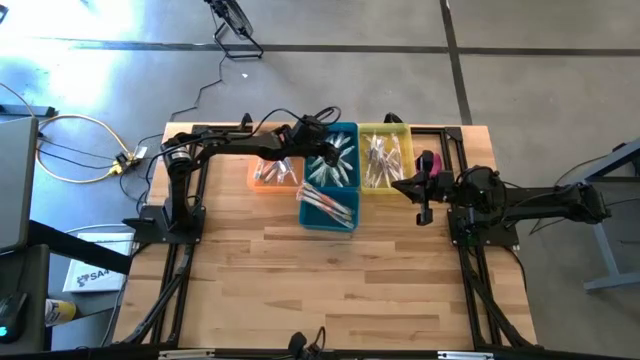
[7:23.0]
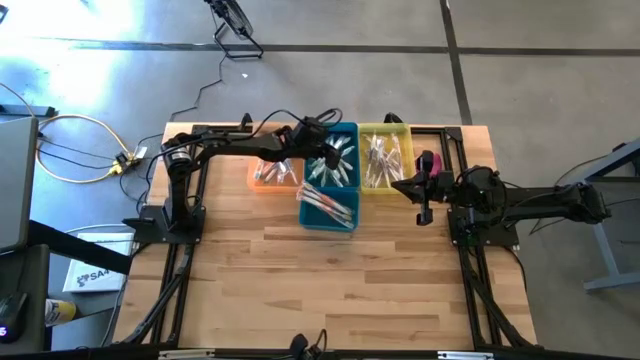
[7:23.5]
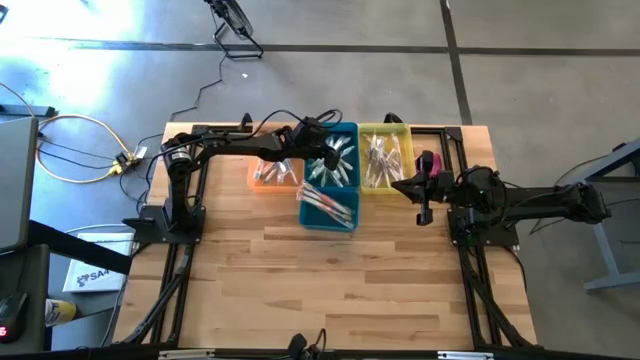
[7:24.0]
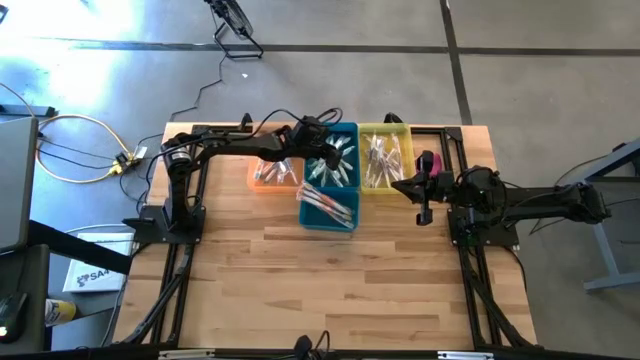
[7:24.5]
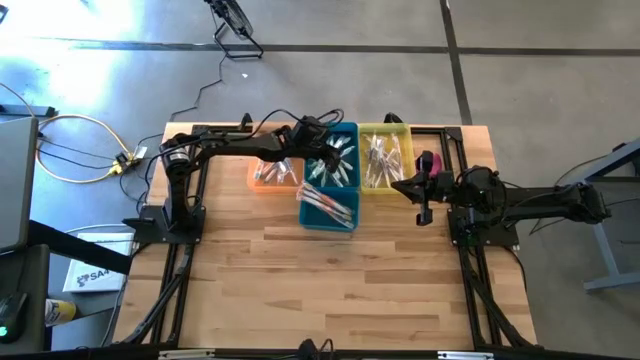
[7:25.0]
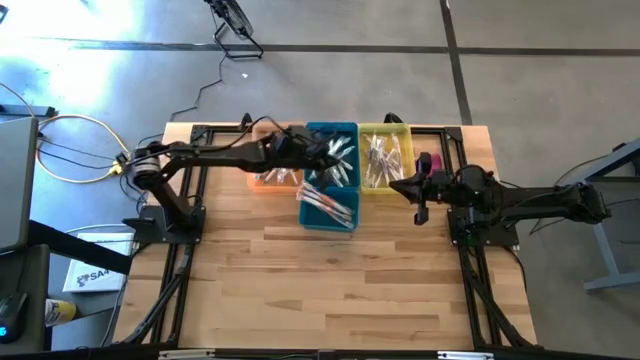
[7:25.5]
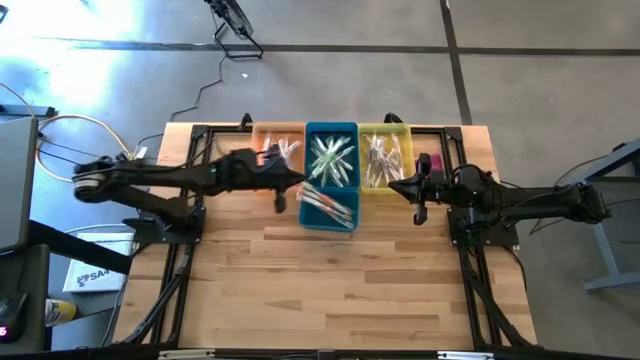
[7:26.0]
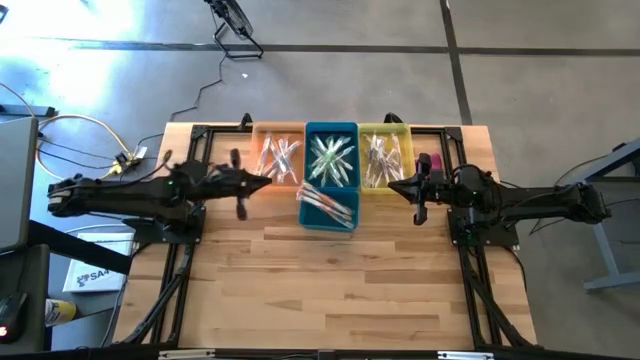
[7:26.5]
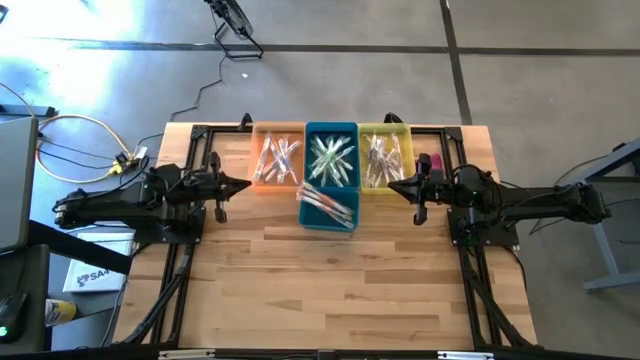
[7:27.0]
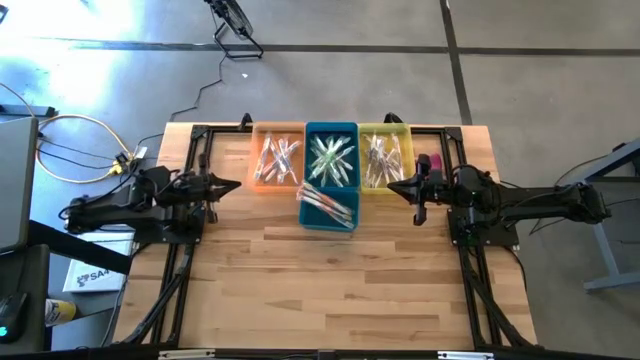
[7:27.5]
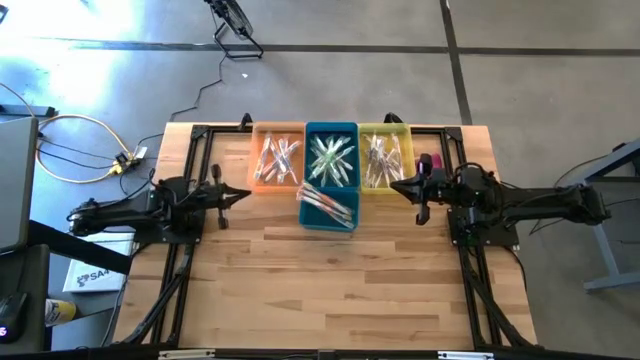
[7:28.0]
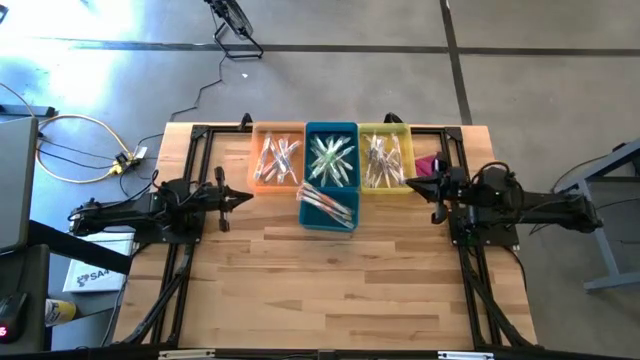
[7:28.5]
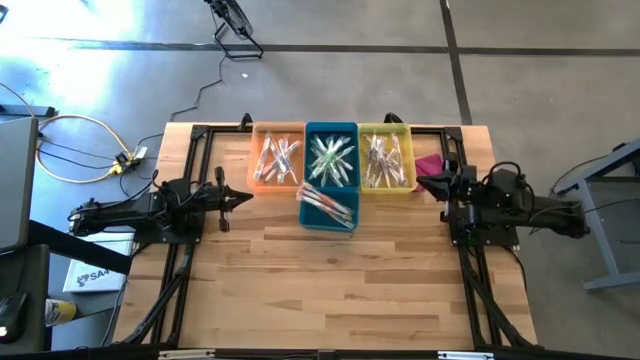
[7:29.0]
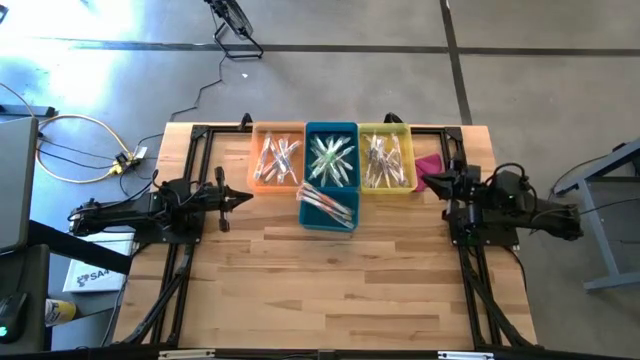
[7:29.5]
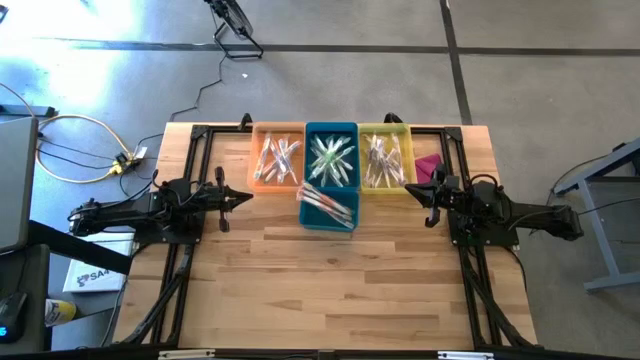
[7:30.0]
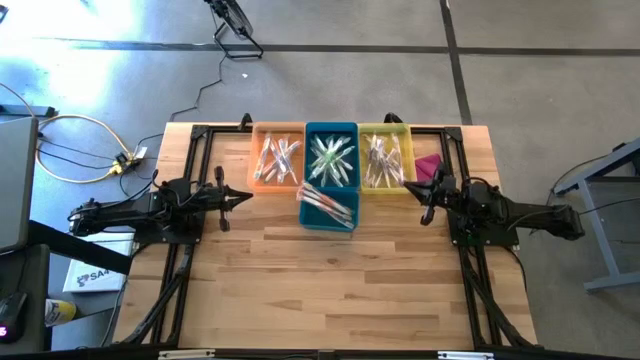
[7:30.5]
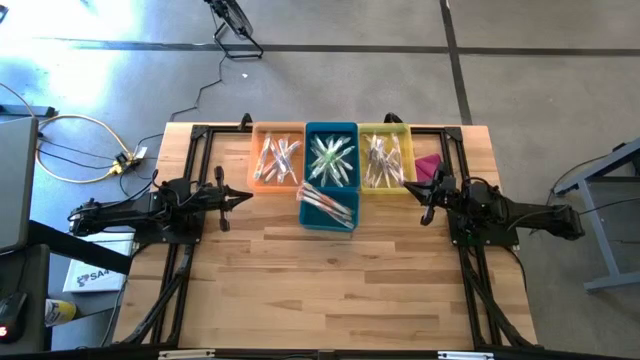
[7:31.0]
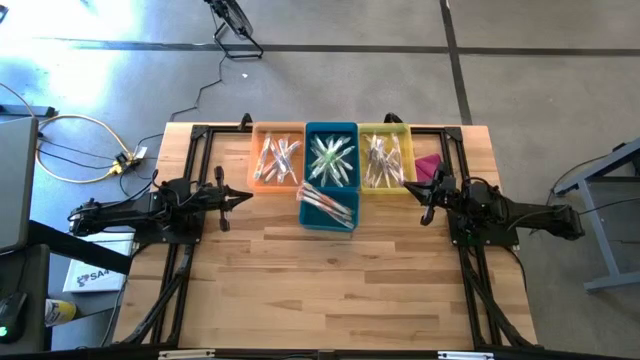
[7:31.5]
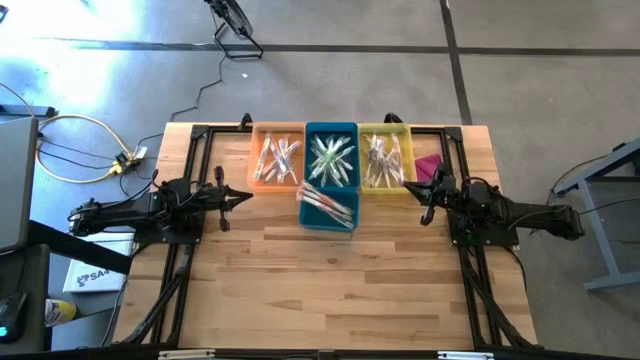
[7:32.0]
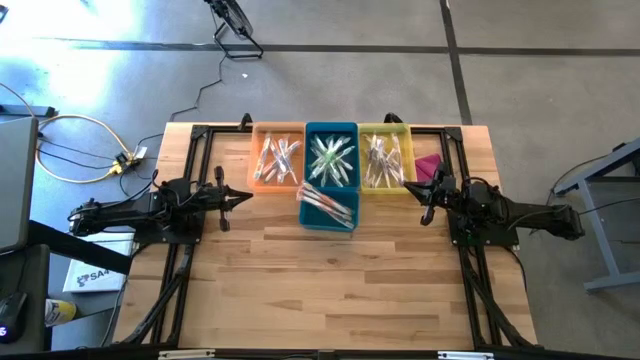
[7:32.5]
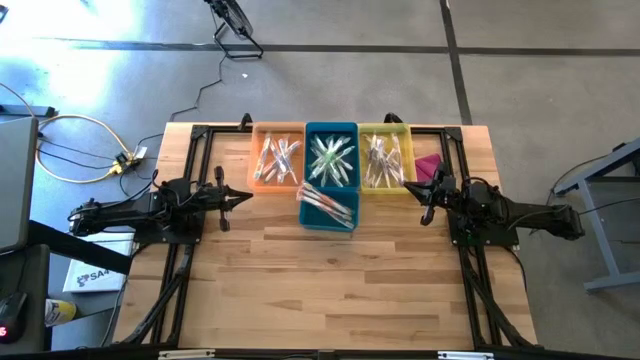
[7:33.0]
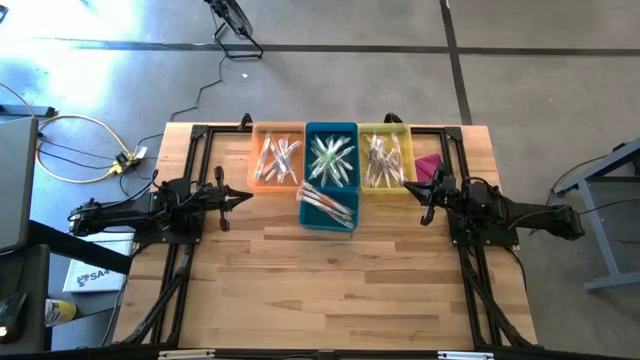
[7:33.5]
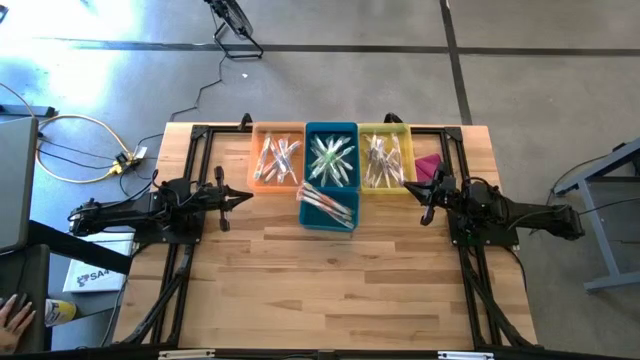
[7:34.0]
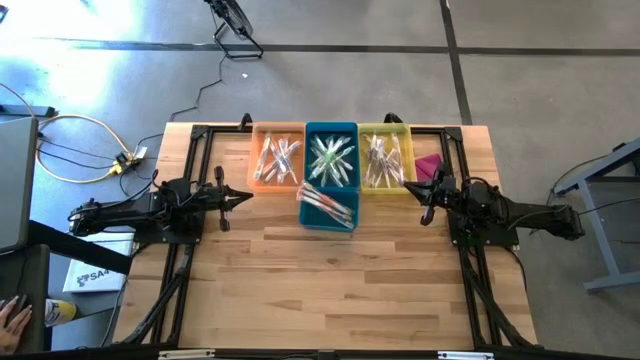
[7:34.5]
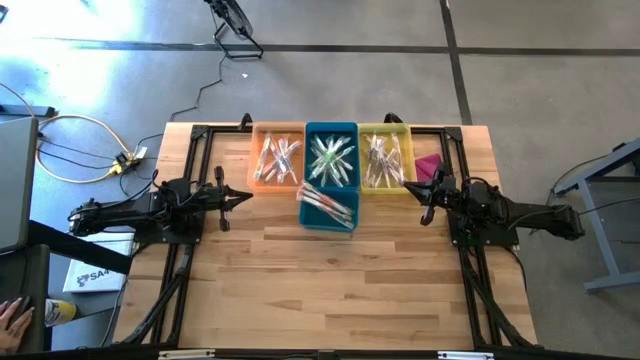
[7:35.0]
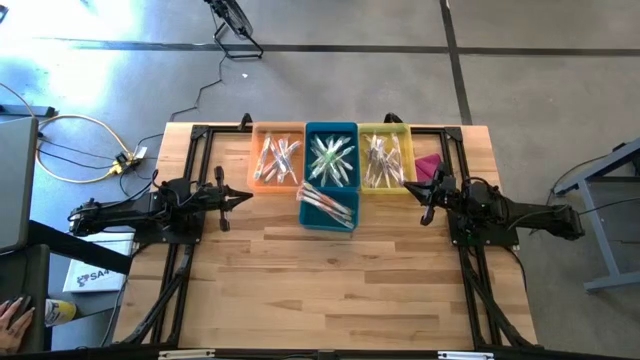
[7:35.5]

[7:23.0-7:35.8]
Task: Pick & Place Toothbrushes
Return to Home Position

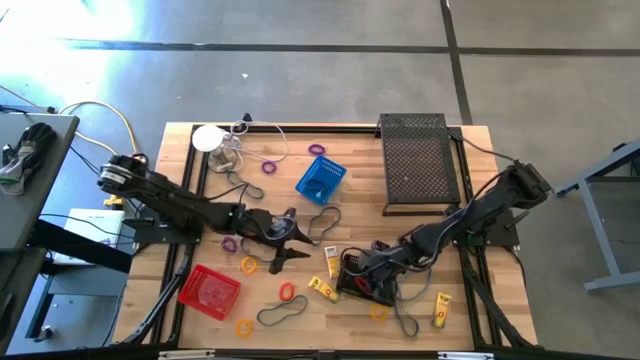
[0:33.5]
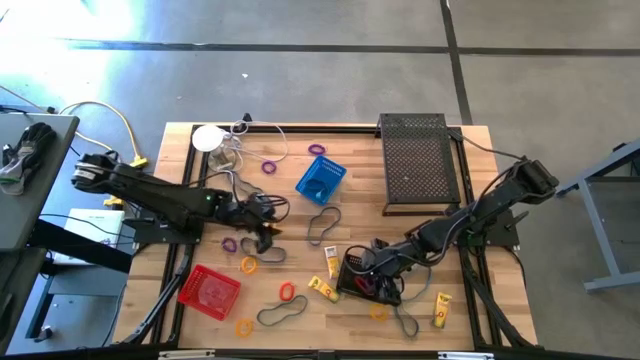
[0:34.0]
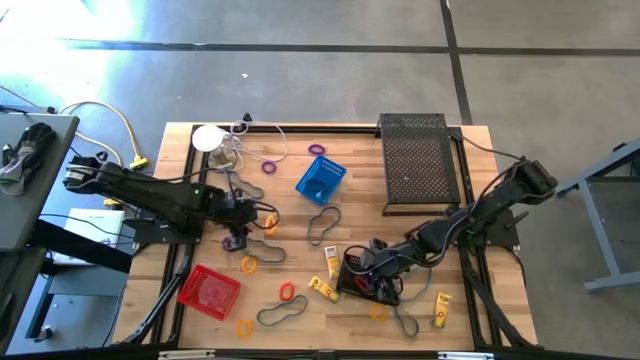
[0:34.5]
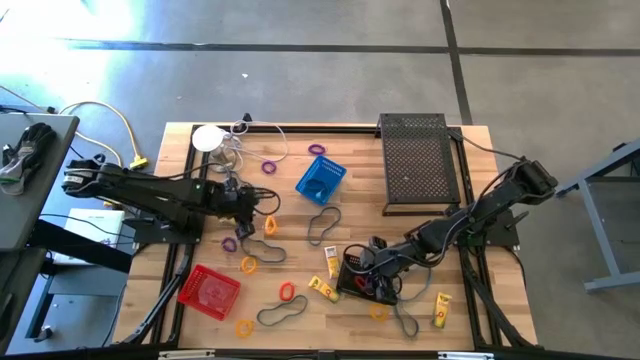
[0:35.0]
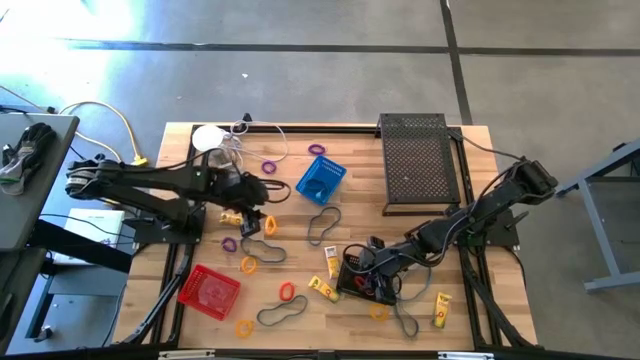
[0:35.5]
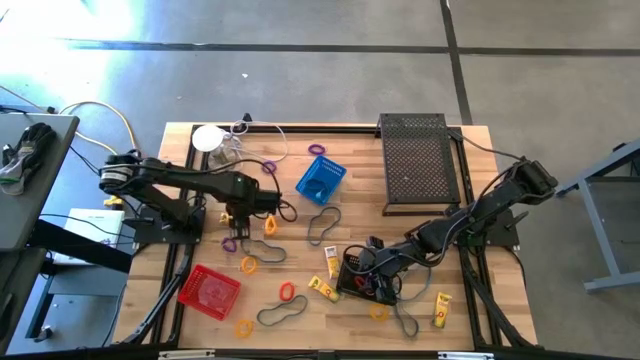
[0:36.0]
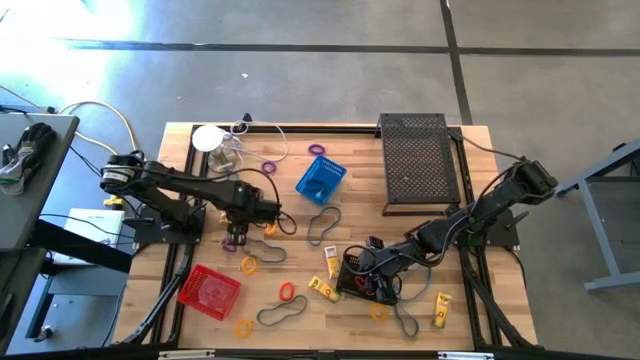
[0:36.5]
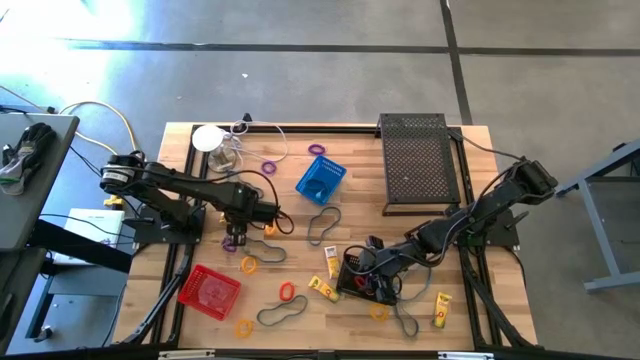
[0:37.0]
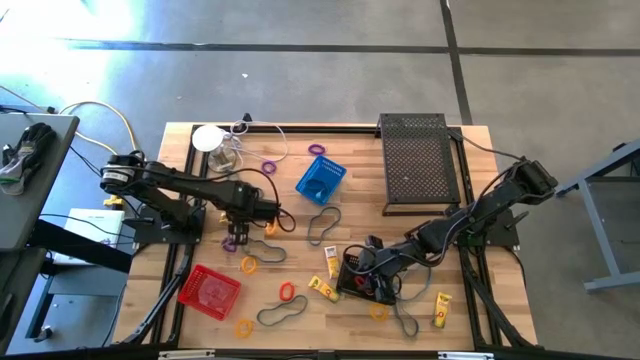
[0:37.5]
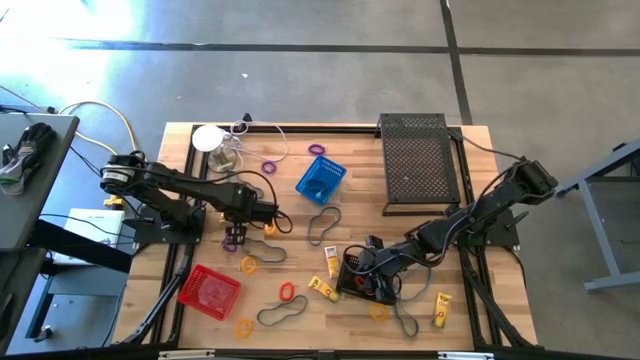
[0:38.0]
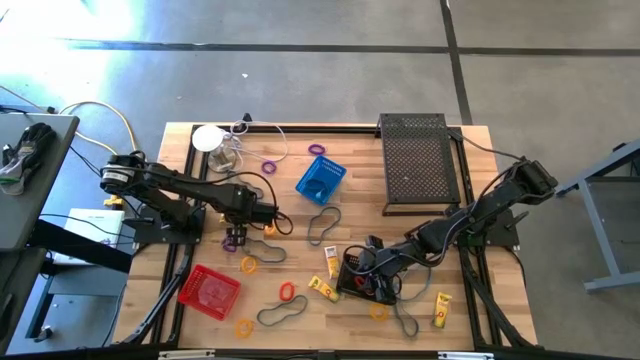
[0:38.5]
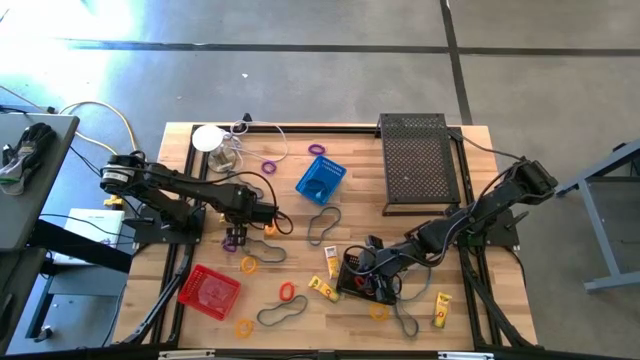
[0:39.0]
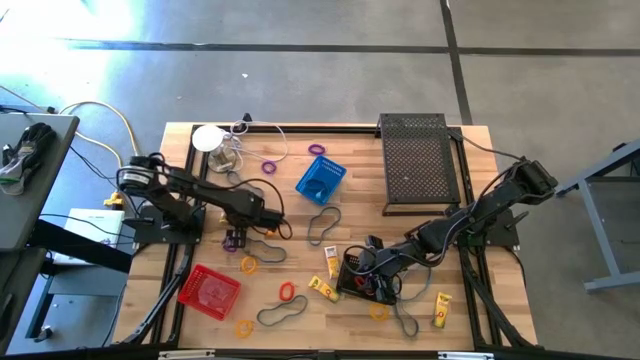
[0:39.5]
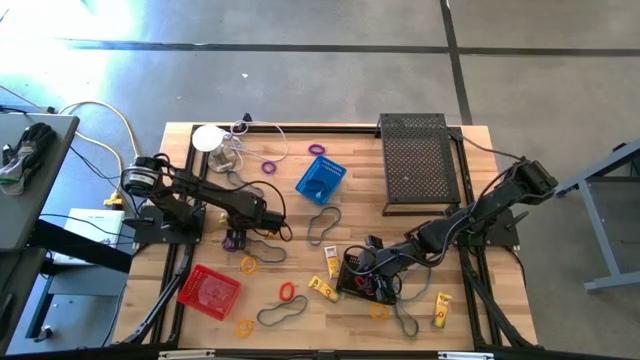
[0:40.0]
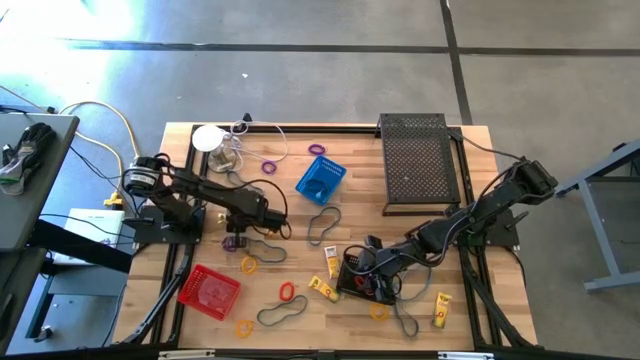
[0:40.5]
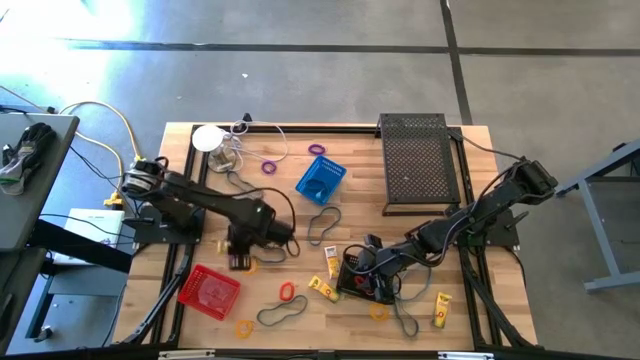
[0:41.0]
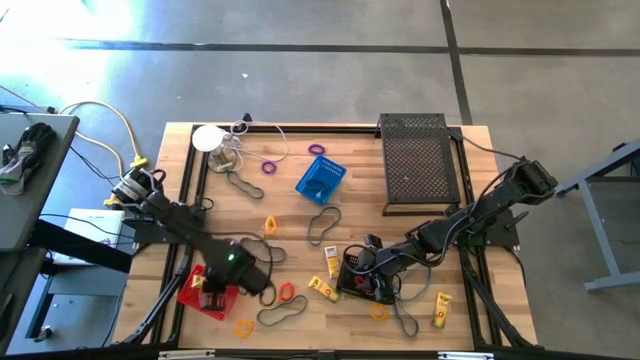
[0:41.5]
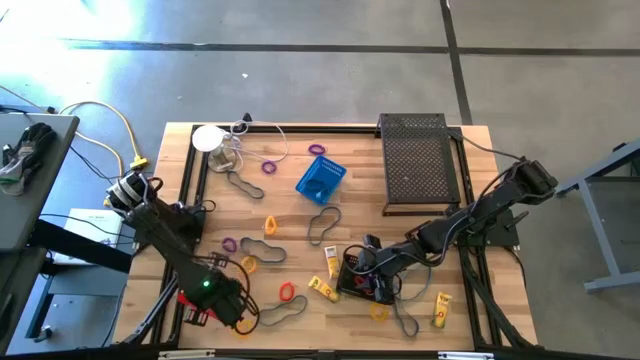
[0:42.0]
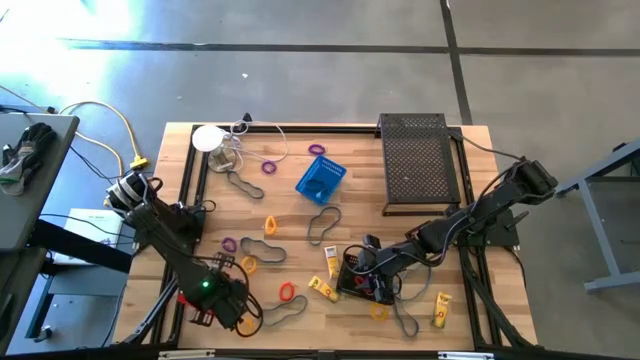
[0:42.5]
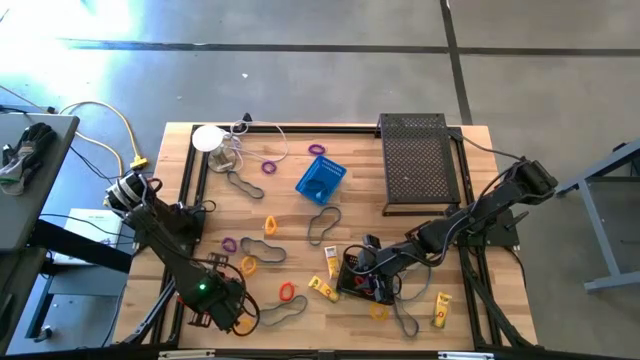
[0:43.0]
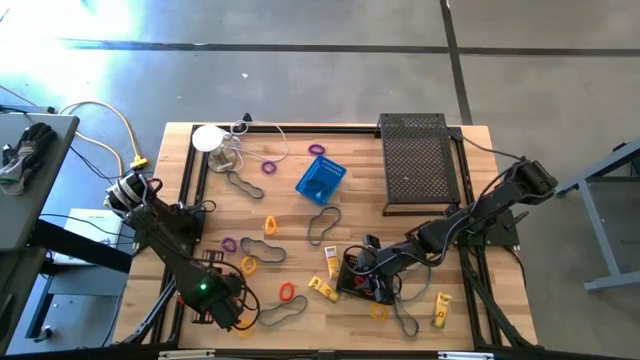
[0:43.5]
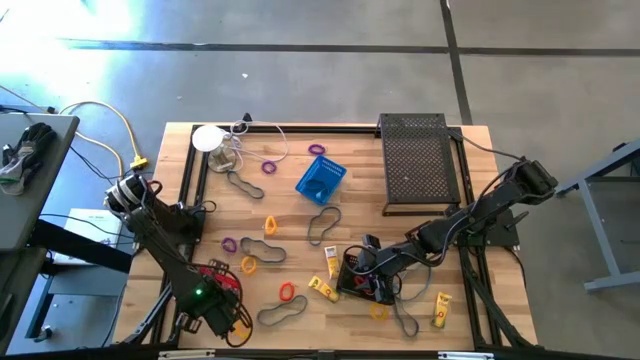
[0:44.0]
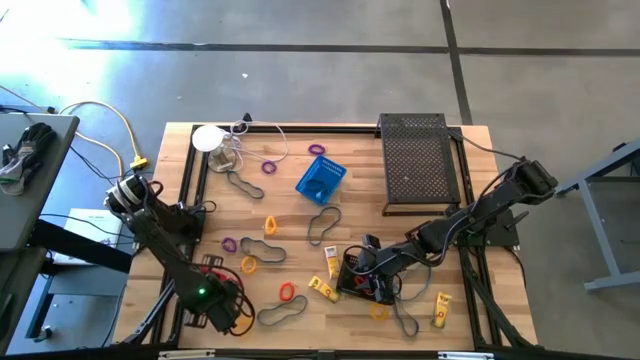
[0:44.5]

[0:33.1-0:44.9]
Task: Pick & Place Office Desk Supplies
Put the crayon box into the red bin
